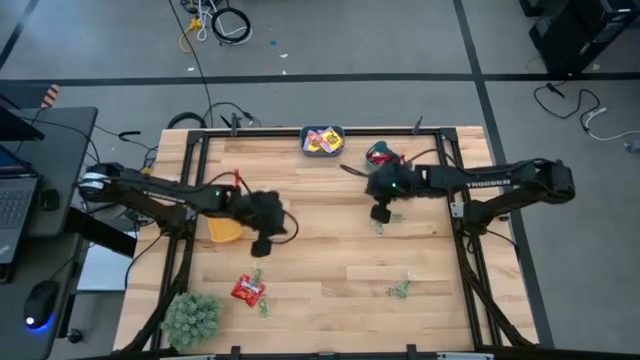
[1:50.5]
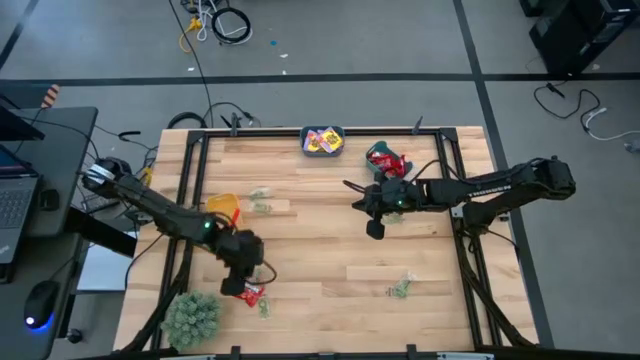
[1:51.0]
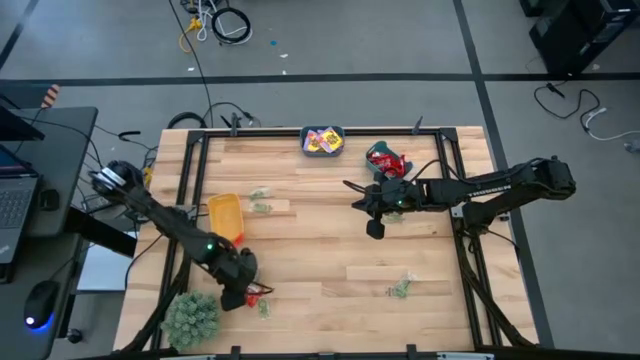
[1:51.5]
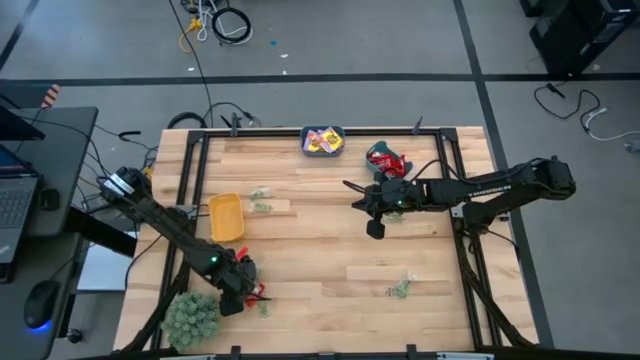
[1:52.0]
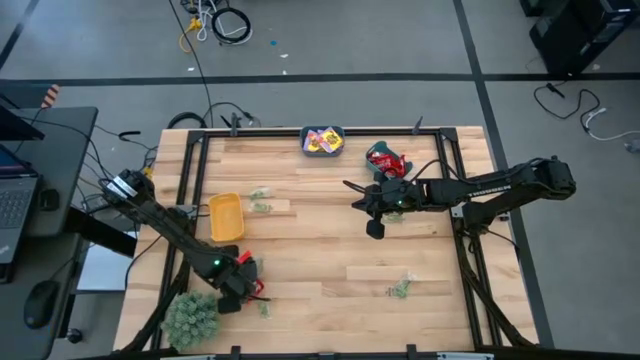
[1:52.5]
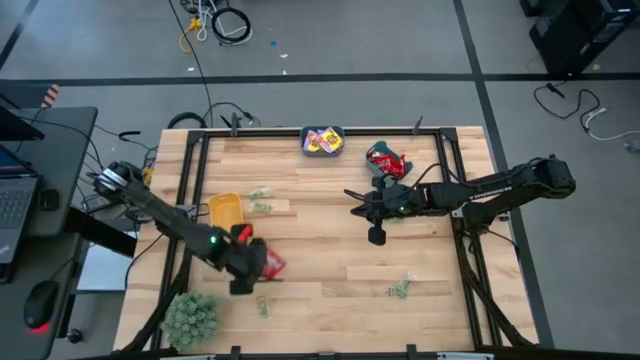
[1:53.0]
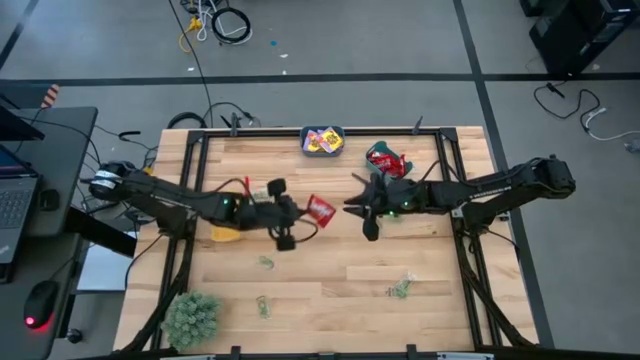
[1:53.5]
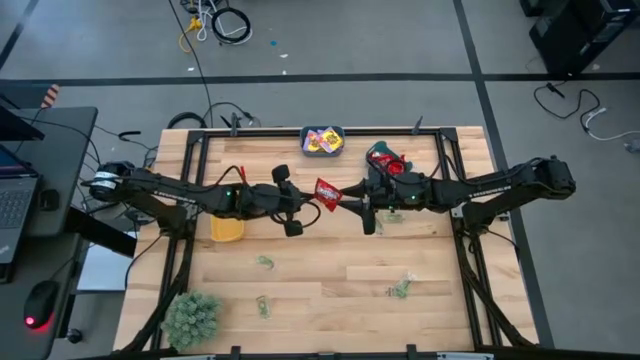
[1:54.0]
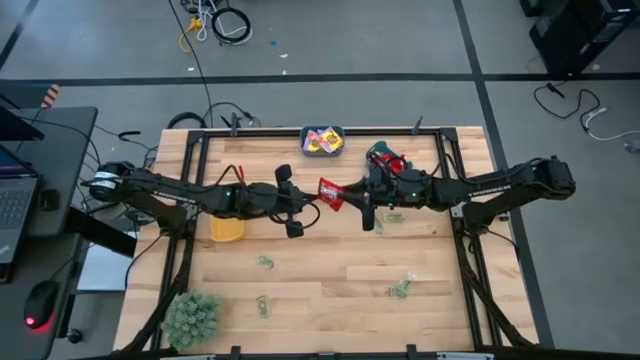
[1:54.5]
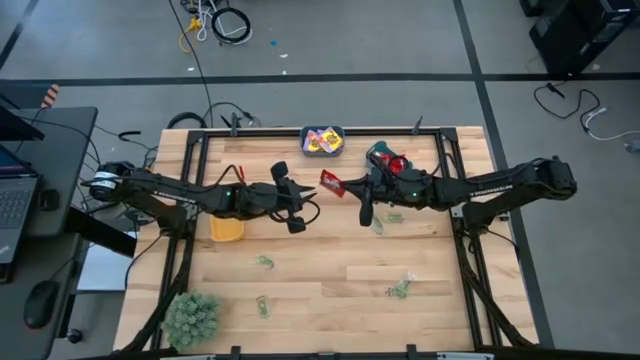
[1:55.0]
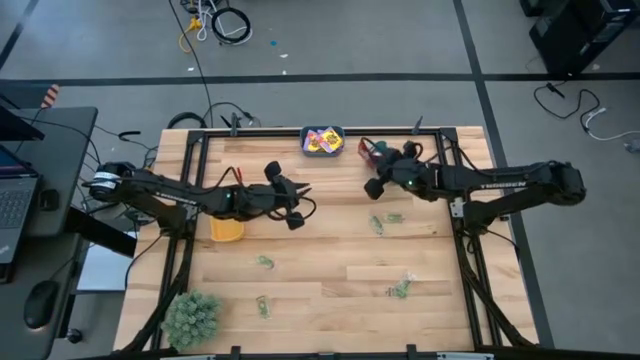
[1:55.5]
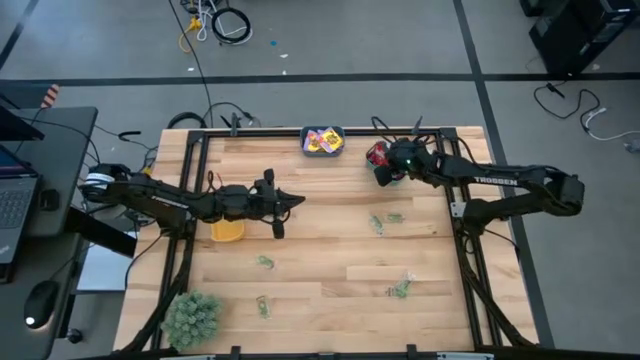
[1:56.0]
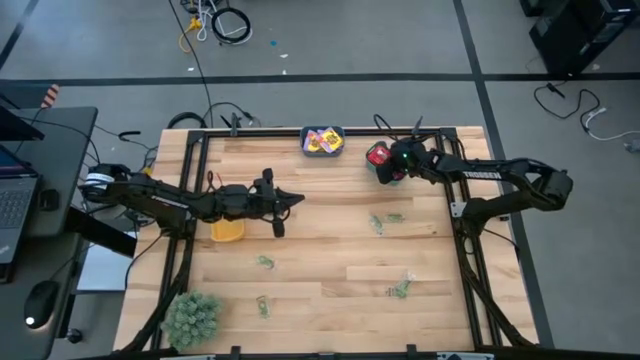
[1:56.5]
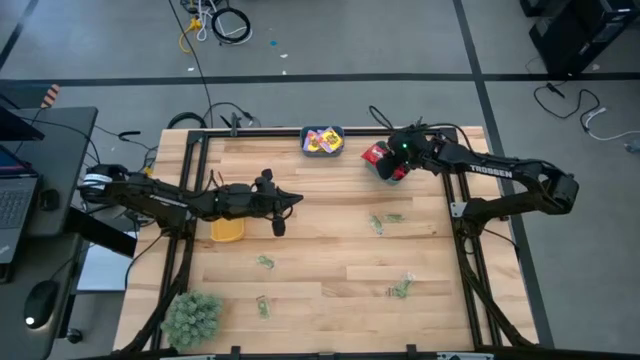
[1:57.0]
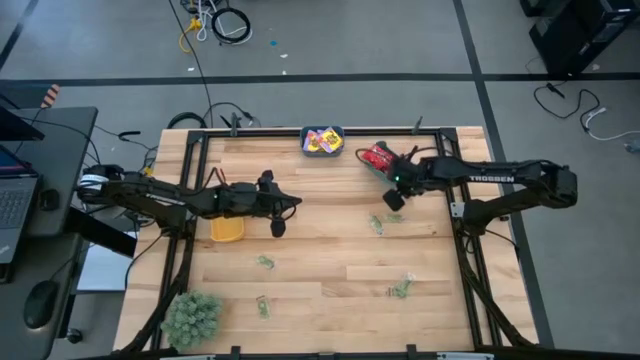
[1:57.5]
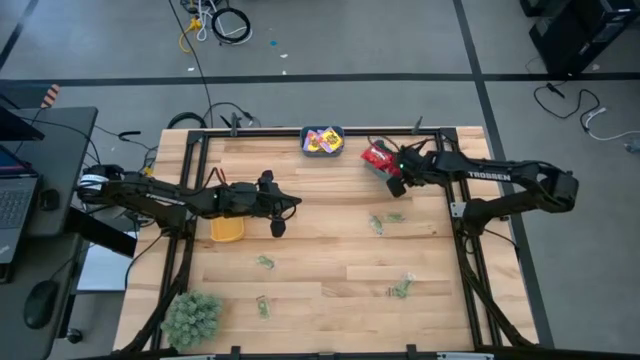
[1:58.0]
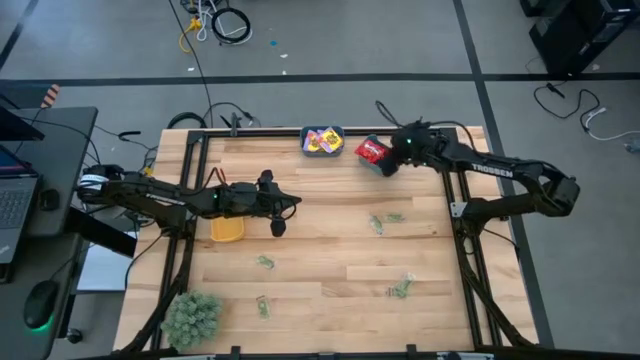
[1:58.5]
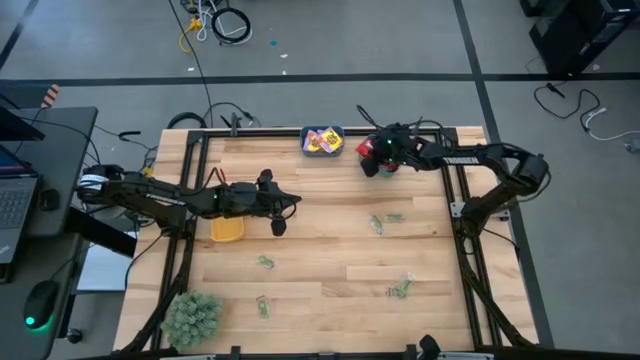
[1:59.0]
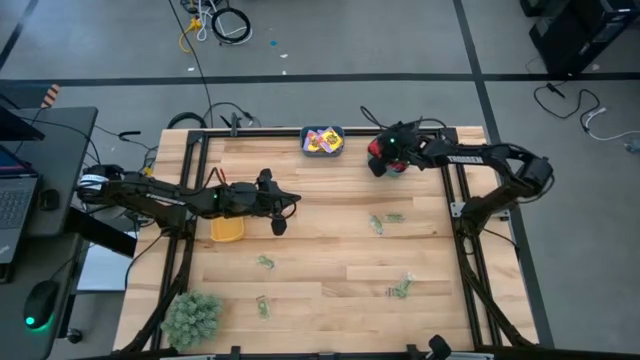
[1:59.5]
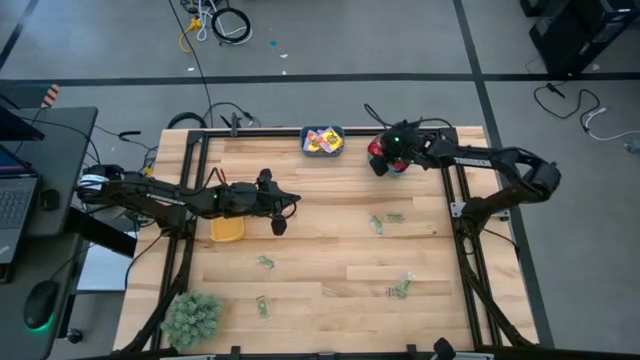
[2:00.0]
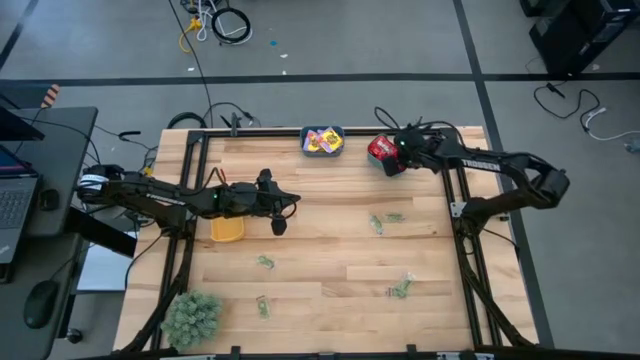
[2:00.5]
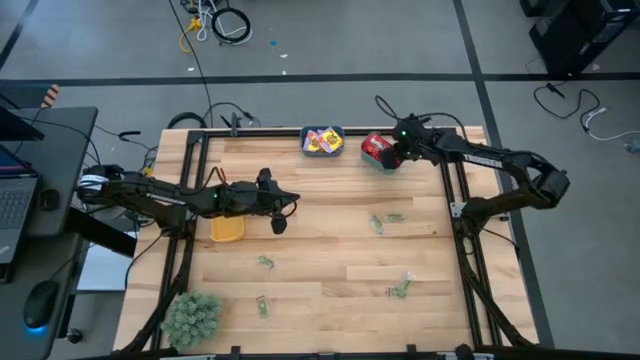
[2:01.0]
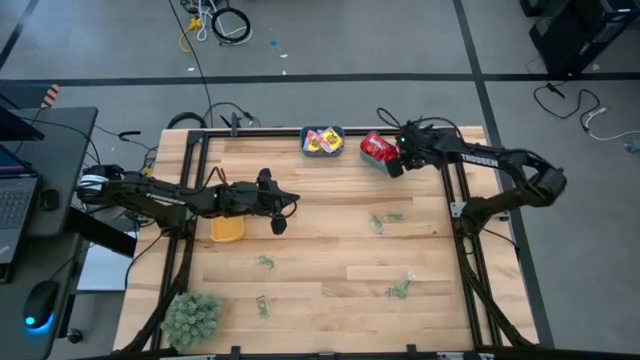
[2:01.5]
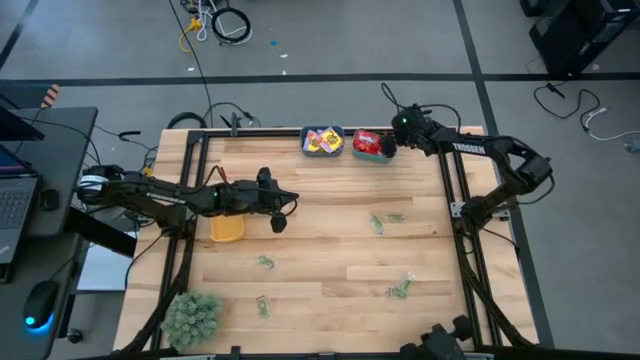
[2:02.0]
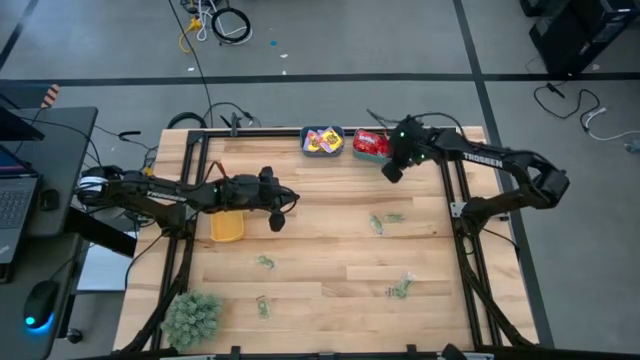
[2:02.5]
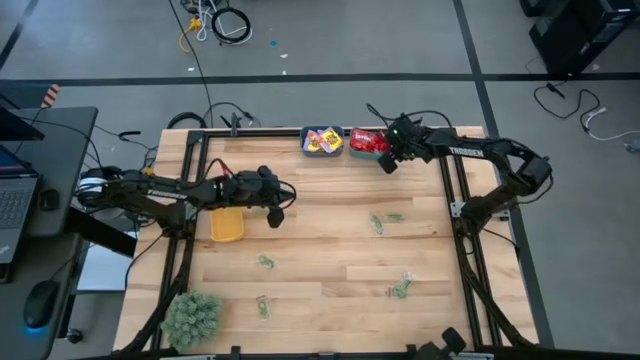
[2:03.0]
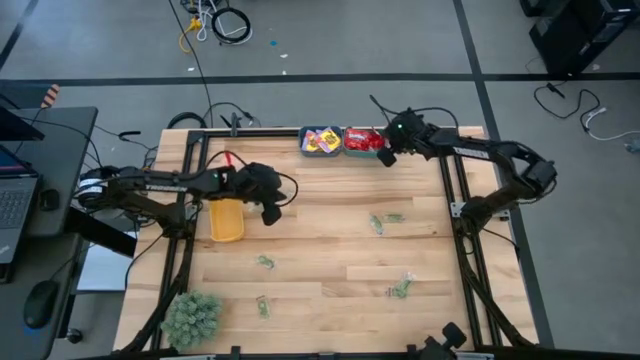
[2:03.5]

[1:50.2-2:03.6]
Task: Sort candy
Put the red candy into the green bin

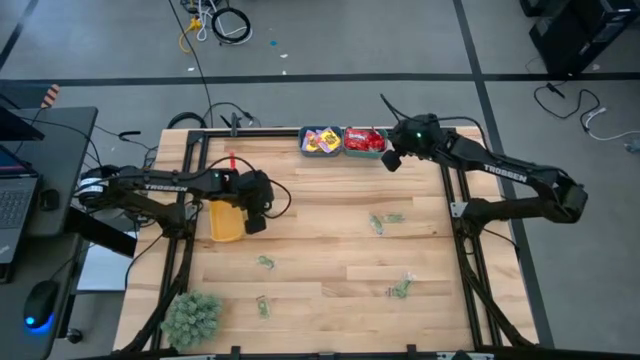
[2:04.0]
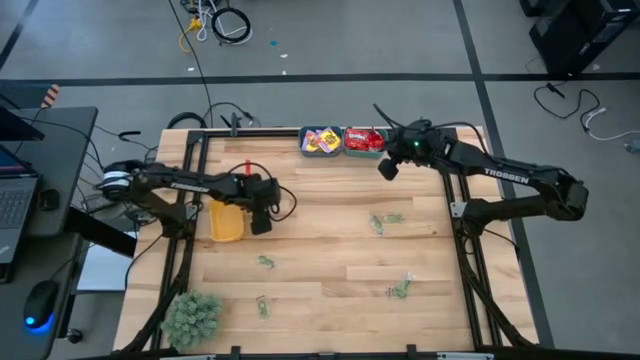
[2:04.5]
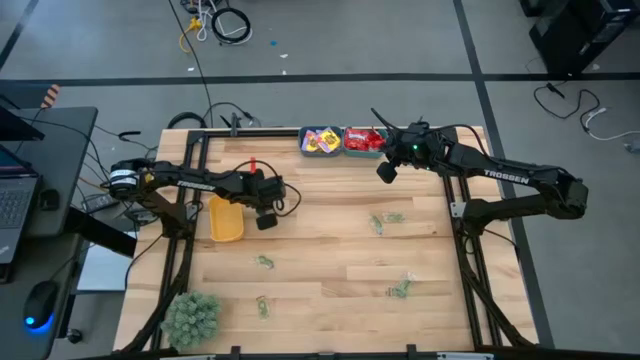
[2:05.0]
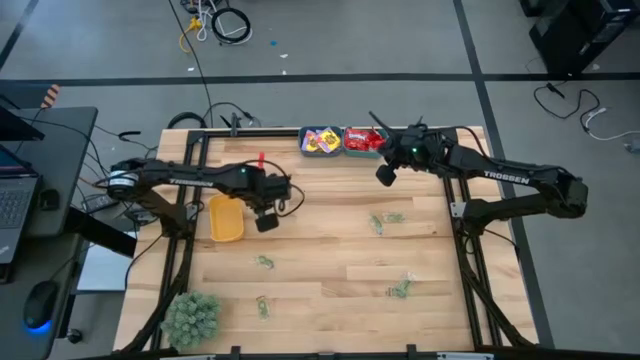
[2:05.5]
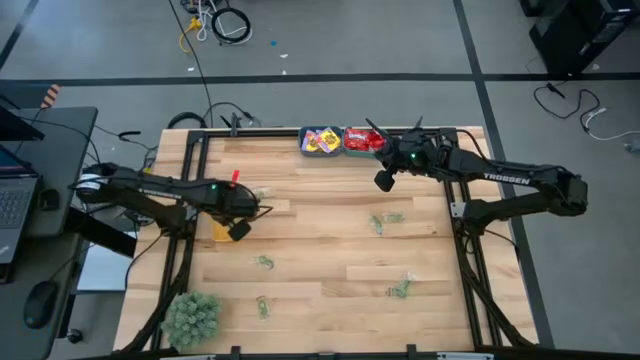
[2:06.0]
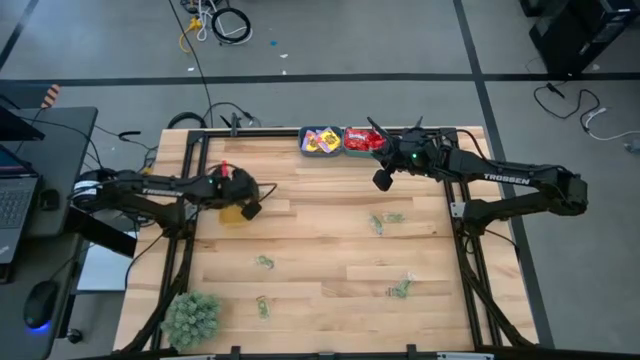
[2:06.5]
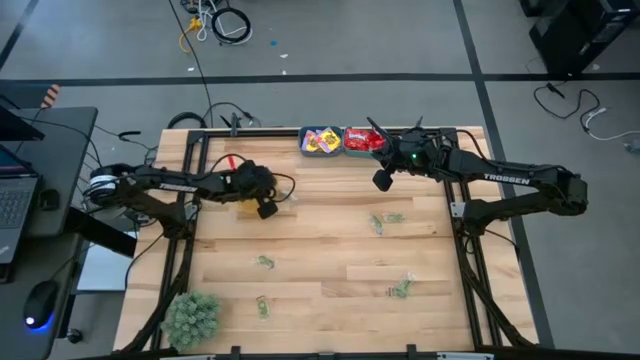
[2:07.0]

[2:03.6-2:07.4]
Put the green gummy into the yellow bin

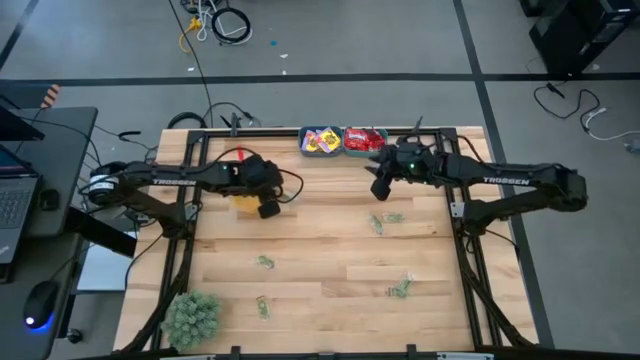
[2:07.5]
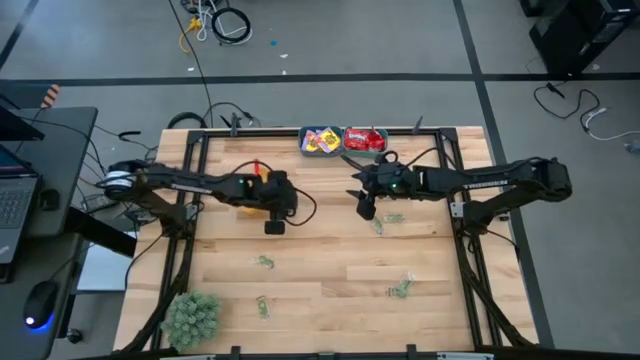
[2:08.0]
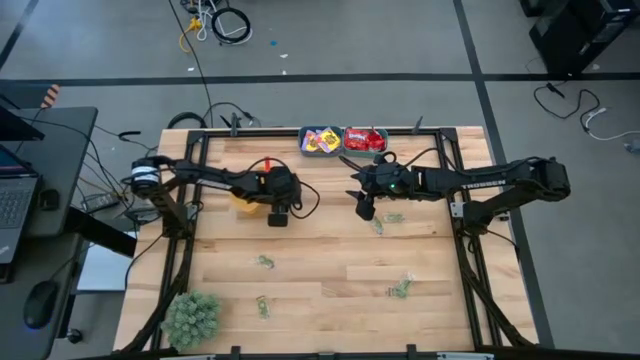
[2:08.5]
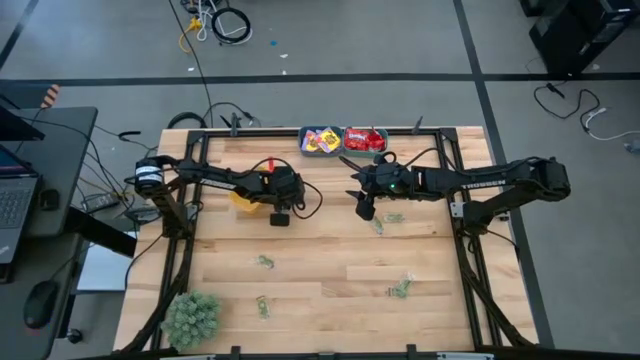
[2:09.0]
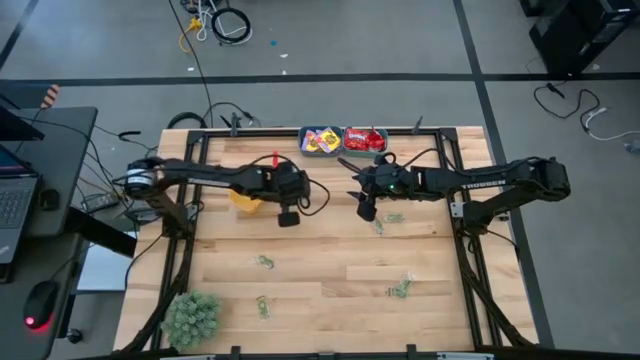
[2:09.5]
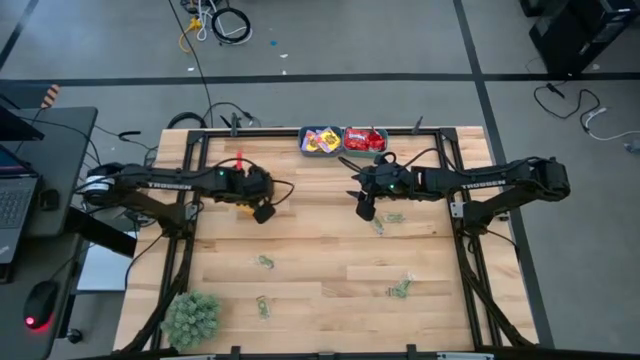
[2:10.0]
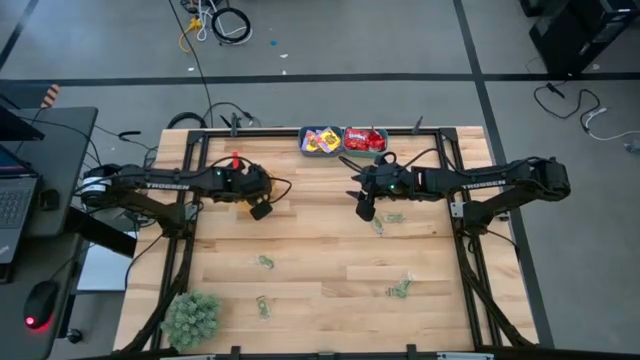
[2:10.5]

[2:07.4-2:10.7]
Put the green gummy into the yellow bin

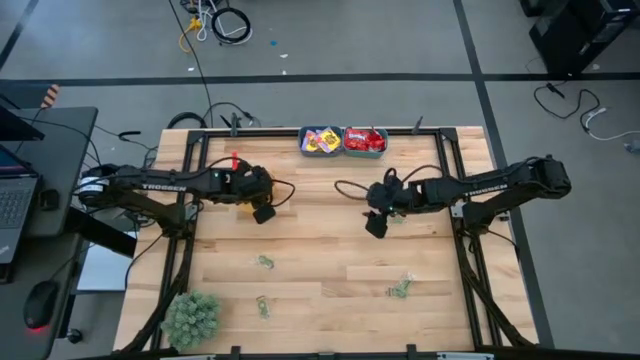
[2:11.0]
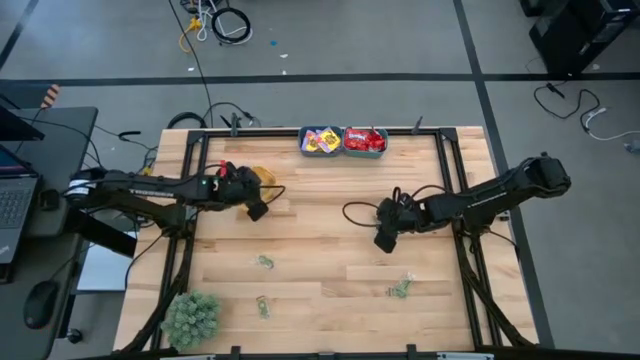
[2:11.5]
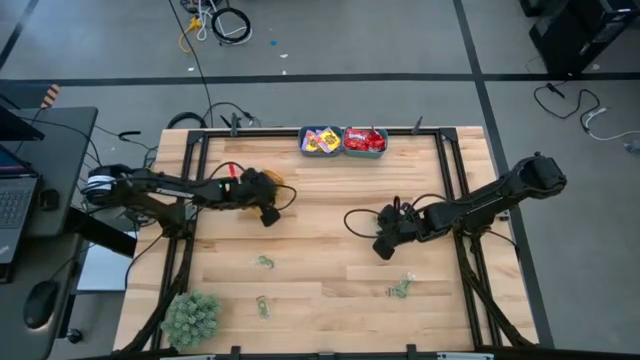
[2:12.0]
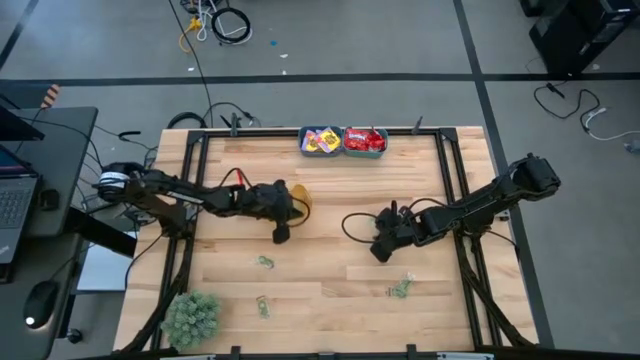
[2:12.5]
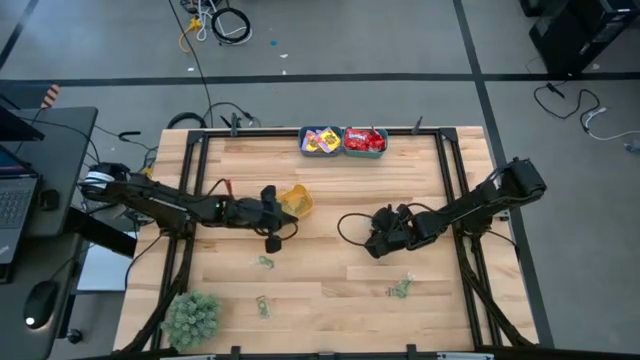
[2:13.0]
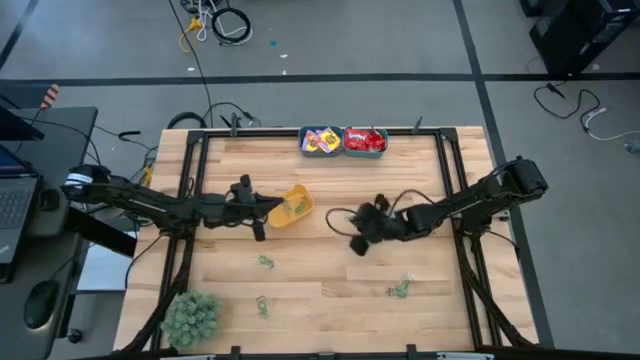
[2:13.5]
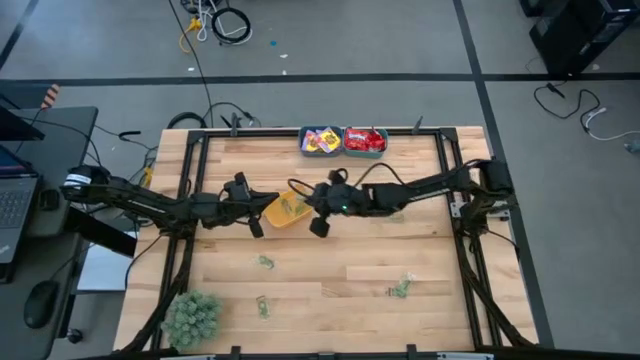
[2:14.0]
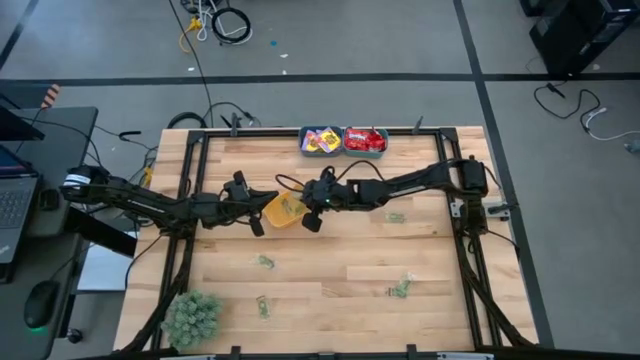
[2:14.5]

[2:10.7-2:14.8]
Put the green gummy into the yellow bin
